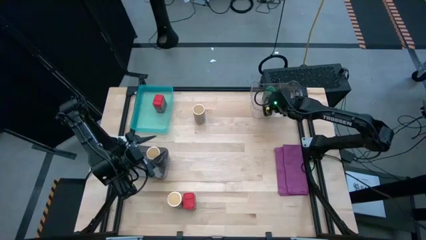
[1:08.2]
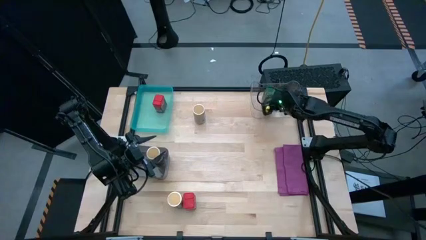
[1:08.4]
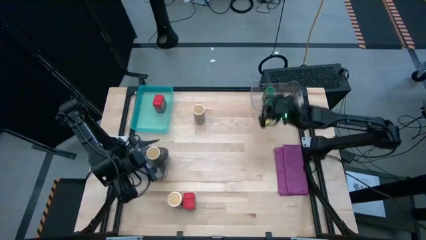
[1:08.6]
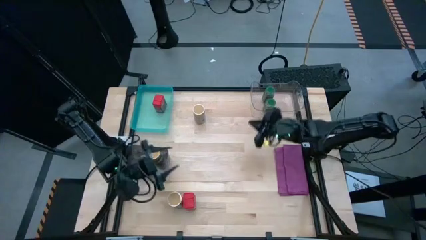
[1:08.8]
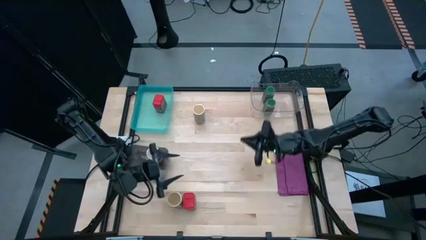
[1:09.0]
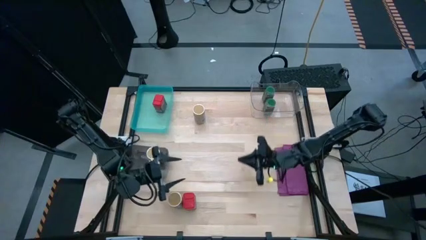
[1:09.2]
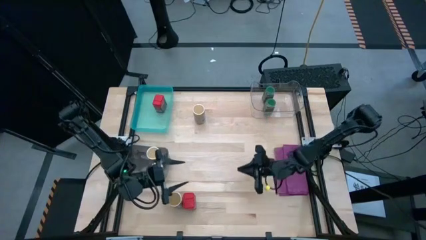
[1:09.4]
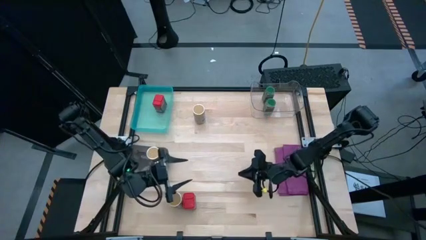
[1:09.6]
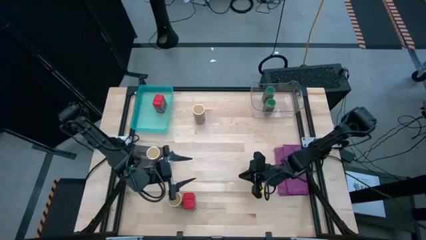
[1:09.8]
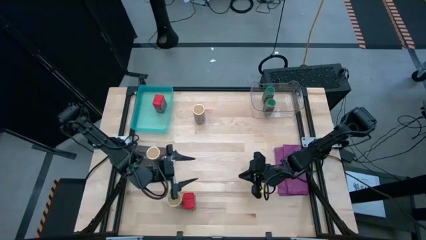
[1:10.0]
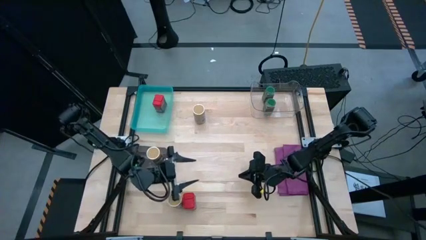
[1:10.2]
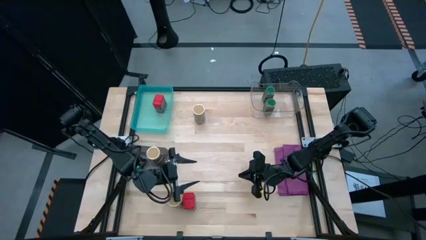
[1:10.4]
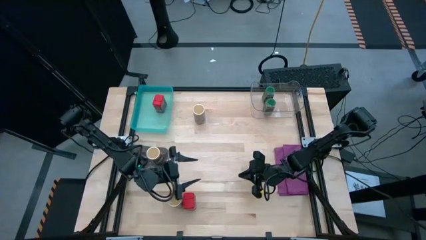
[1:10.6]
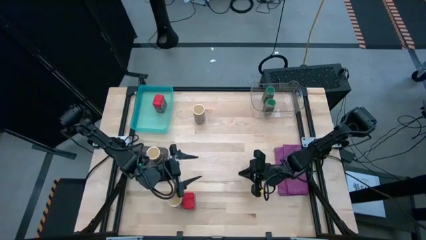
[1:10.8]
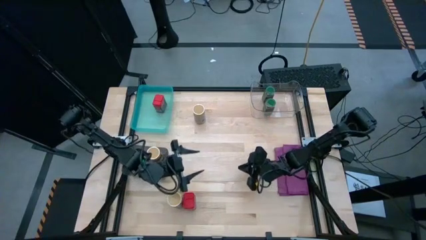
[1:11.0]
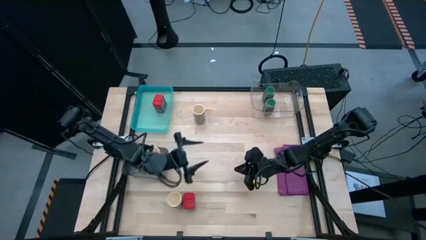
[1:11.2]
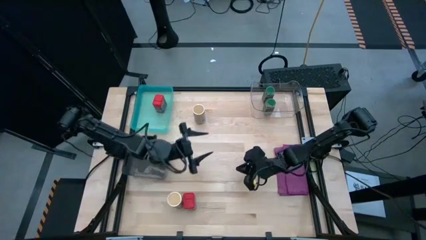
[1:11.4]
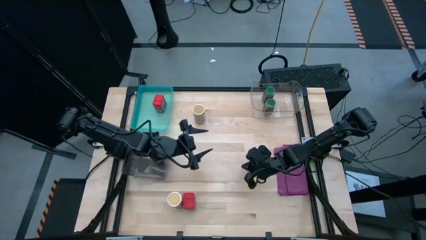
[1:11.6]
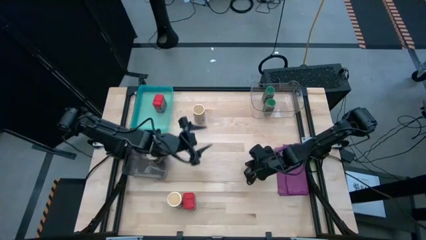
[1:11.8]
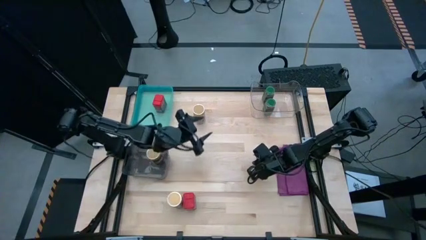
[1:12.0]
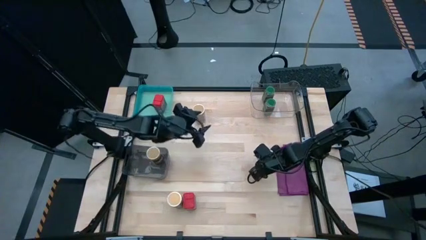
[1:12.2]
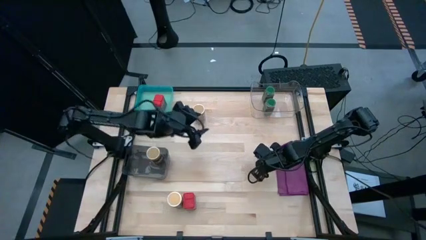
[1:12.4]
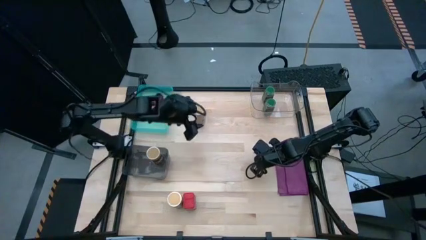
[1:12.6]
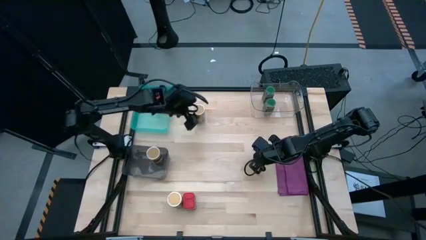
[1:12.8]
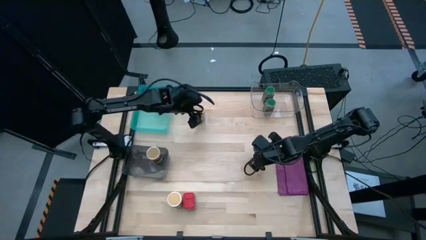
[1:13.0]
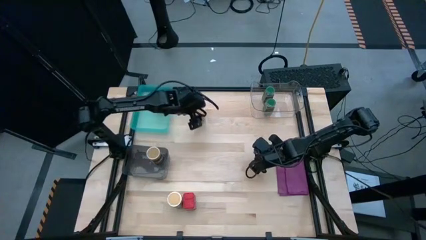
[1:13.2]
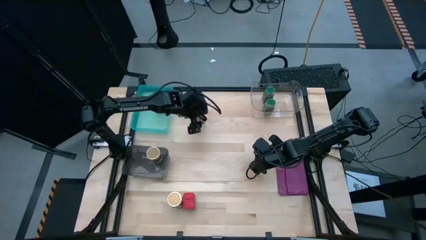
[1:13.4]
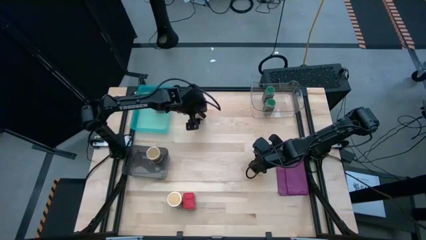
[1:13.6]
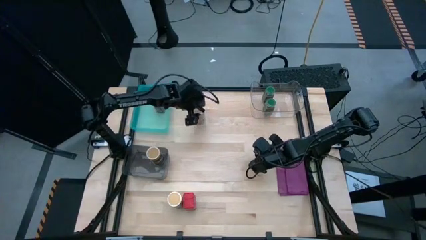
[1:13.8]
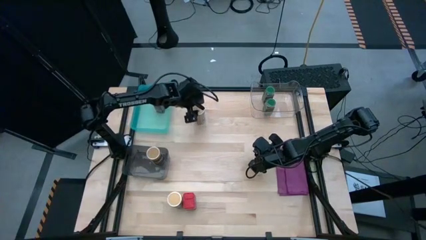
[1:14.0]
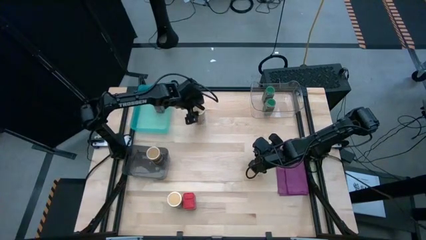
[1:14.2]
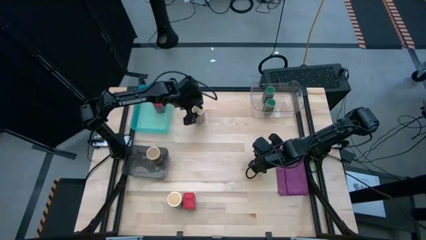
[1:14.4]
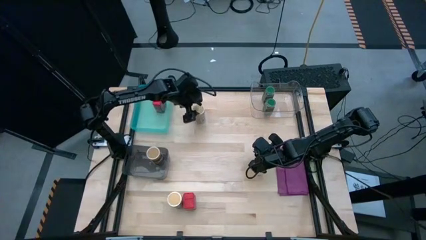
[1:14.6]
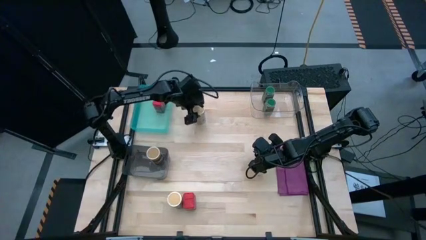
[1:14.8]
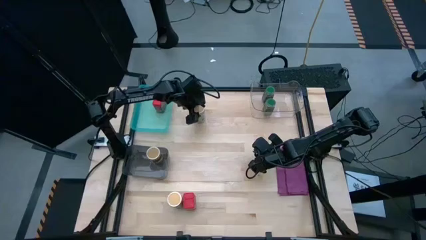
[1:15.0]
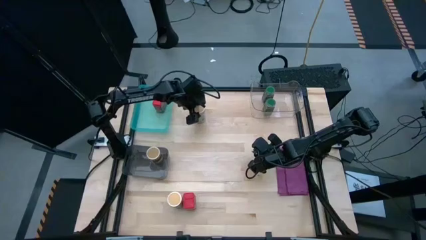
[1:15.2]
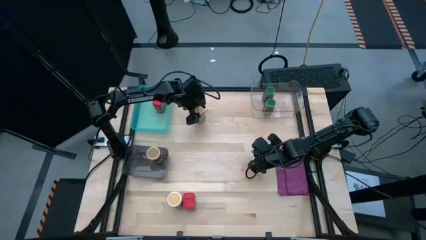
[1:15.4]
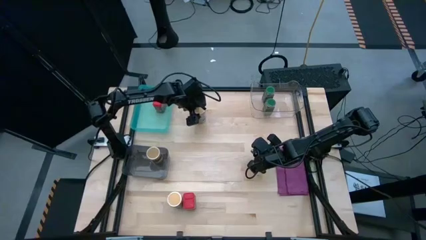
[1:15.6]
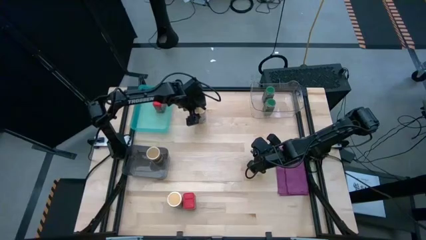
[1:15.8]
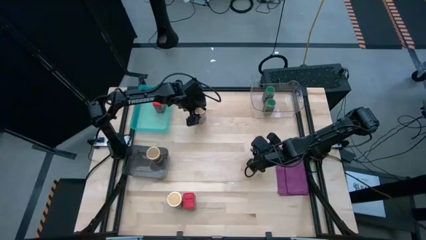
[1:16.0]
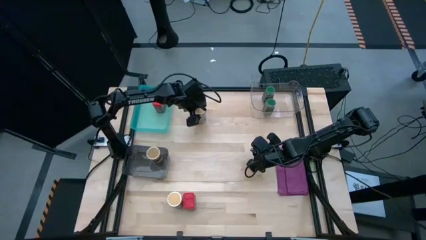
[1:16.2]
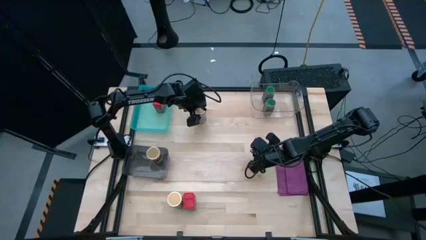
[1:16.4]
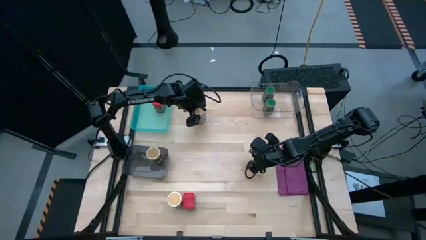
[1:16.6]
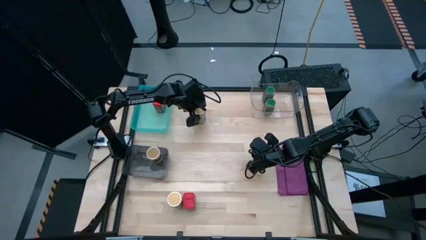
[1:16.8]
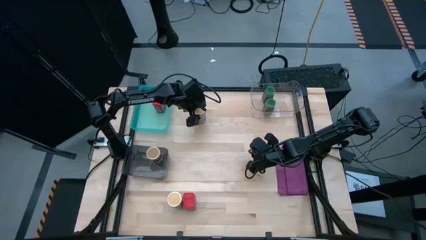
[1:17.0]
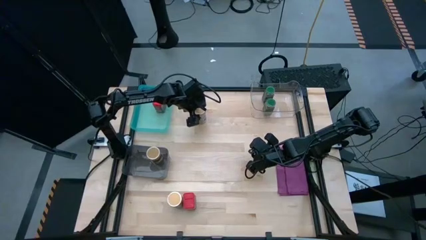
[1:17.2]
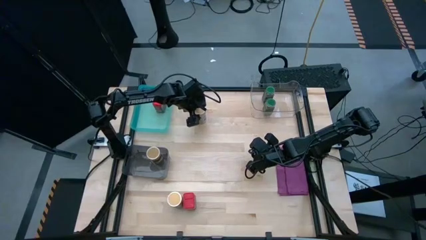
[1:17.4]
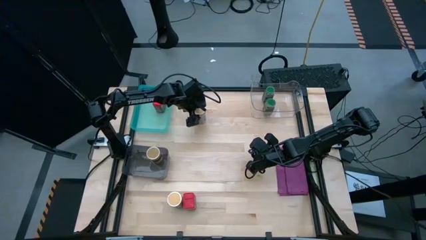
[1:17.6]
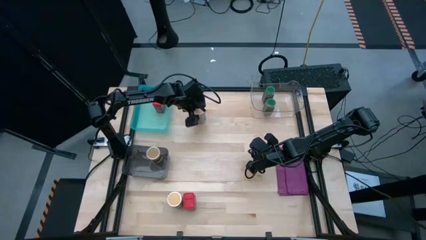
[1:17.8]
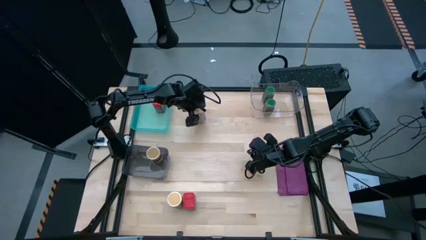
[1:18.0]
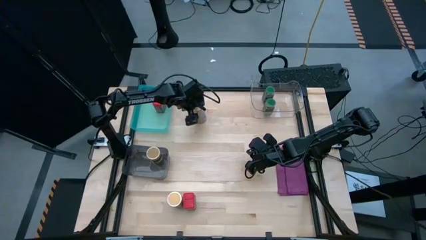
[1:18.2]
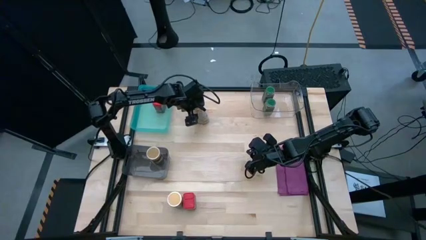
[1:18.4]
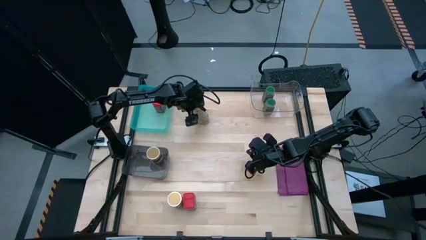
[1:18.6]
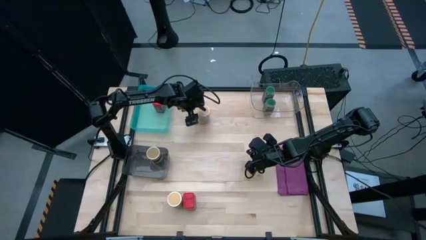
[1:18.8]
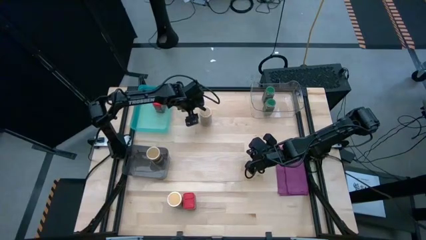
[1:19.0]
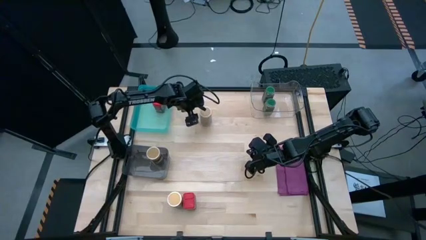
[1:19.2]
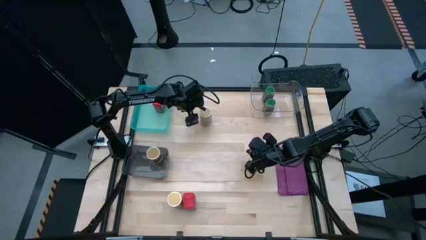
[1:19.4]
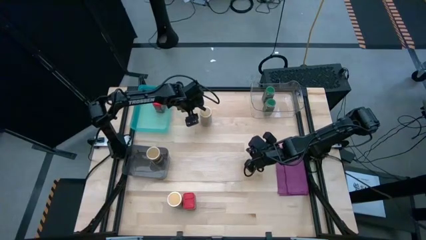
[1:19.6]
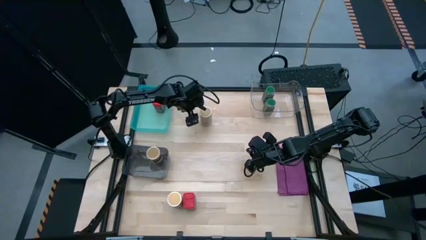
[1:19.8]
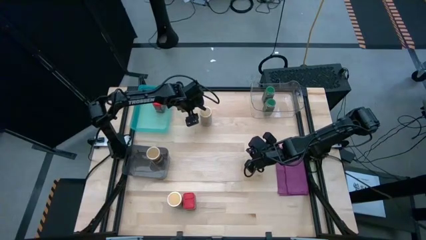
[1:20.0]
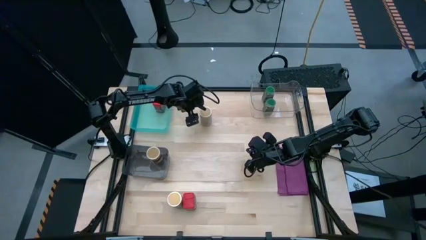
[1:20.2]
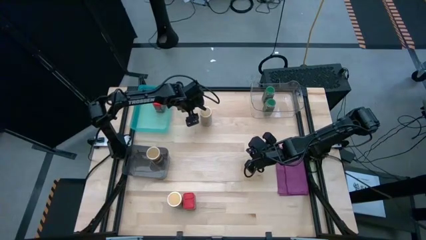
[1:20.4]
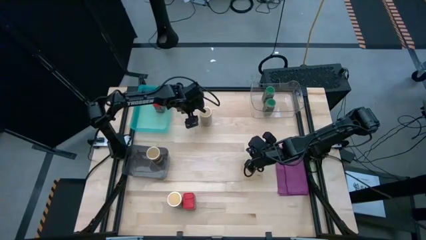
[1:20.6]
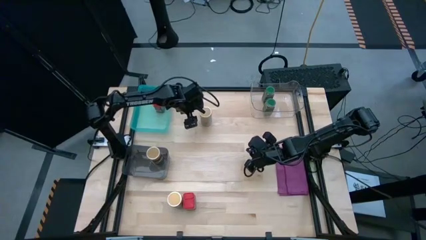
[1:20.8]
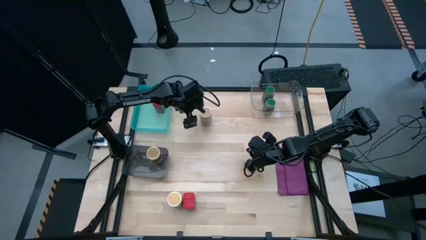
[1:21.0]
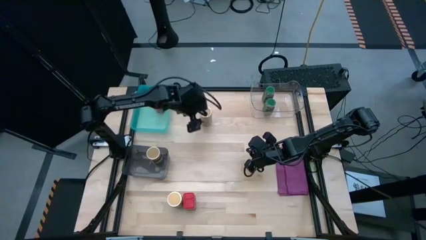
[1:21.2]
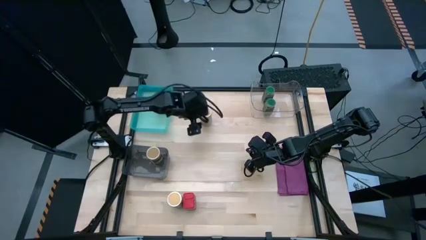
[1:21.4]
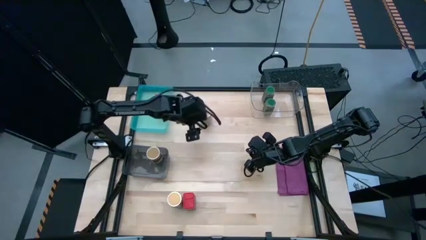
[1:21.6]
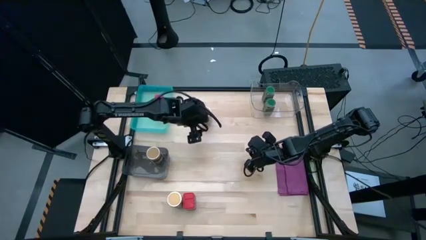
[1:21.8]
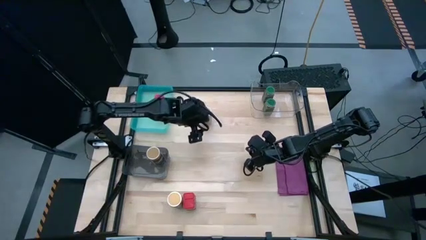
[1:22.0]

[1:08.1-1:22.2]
Task: Sort spices by type
Put the top gold seasoning bottle into the black bin
